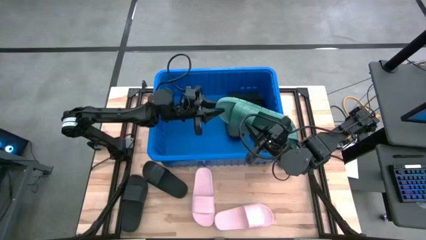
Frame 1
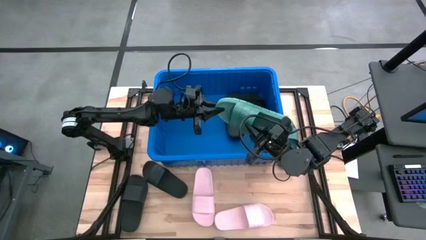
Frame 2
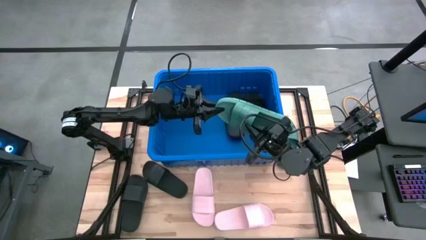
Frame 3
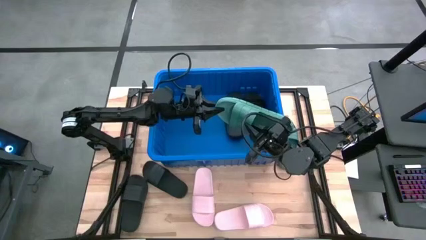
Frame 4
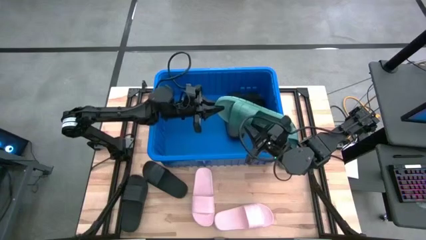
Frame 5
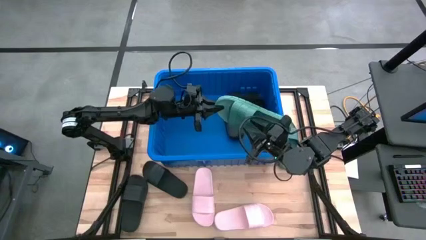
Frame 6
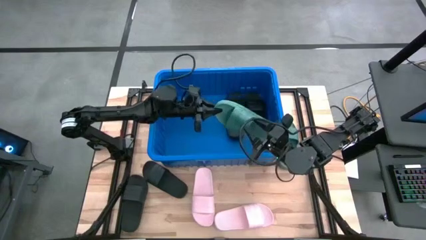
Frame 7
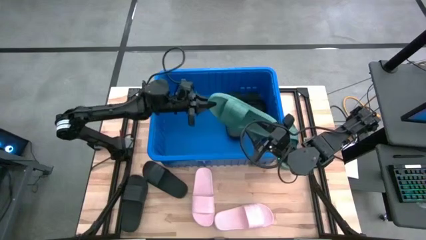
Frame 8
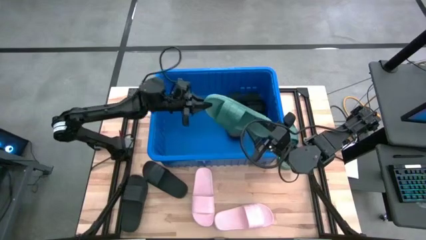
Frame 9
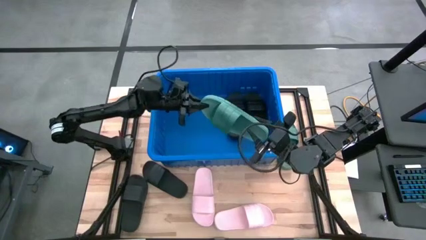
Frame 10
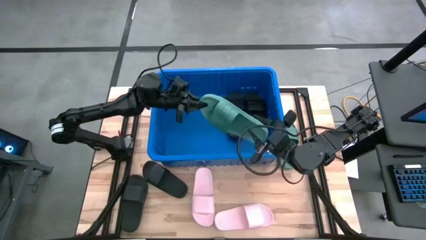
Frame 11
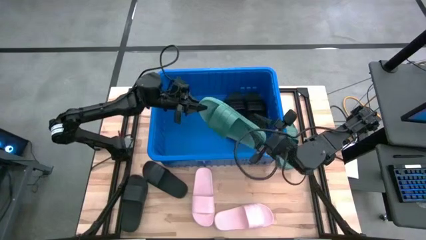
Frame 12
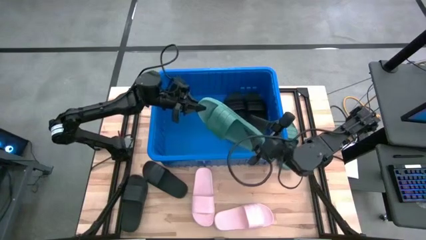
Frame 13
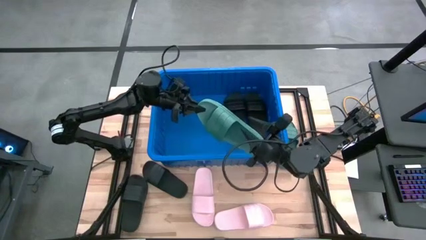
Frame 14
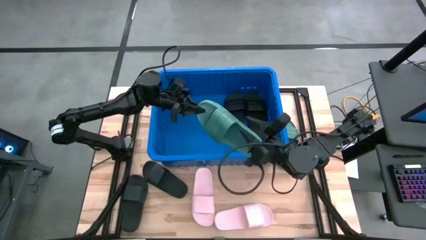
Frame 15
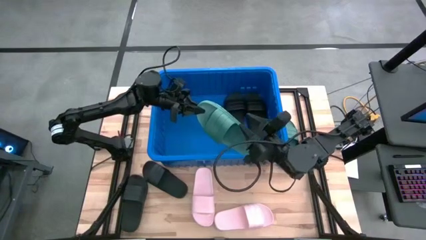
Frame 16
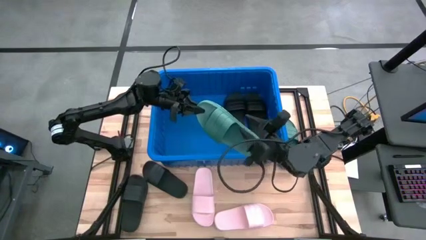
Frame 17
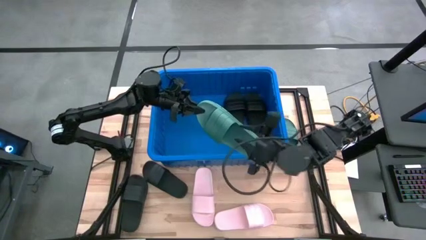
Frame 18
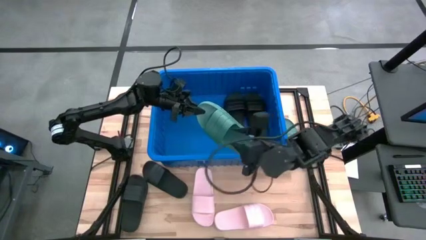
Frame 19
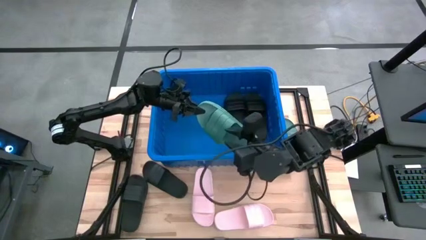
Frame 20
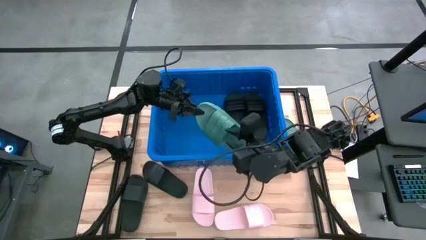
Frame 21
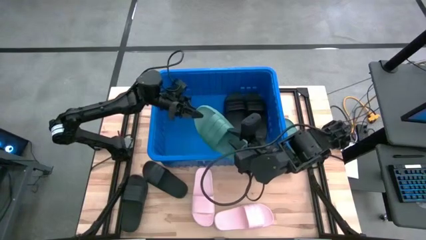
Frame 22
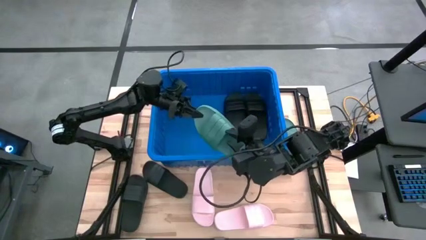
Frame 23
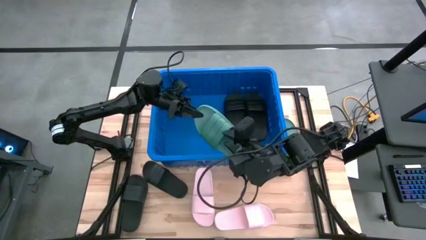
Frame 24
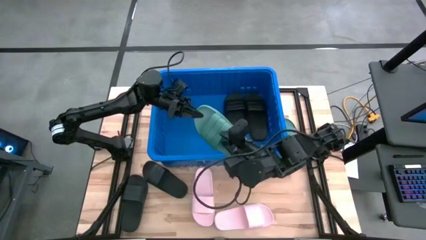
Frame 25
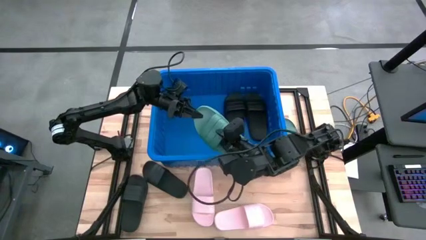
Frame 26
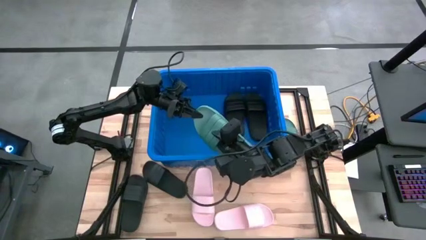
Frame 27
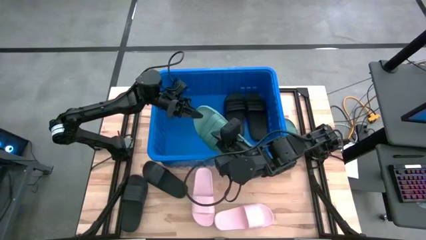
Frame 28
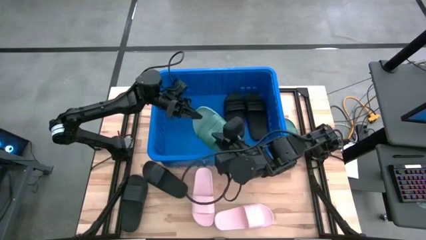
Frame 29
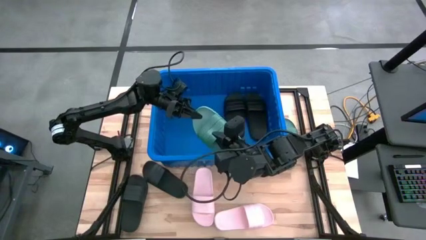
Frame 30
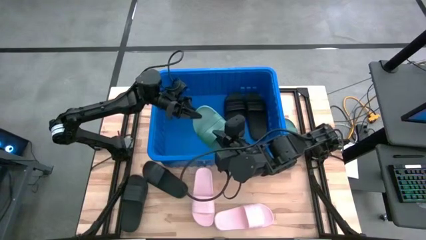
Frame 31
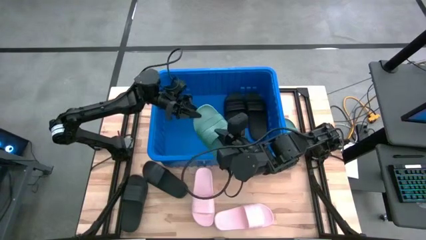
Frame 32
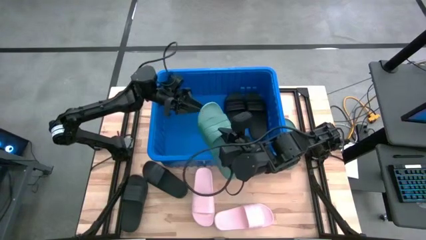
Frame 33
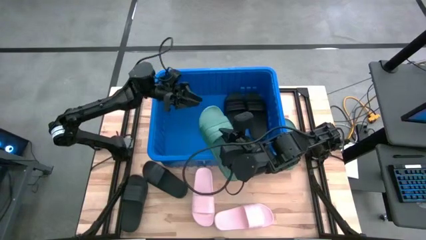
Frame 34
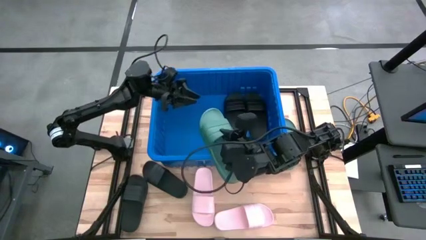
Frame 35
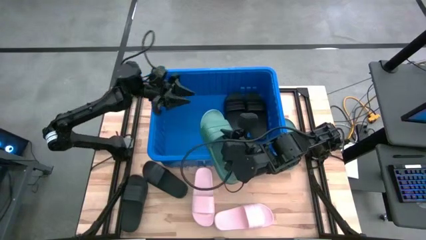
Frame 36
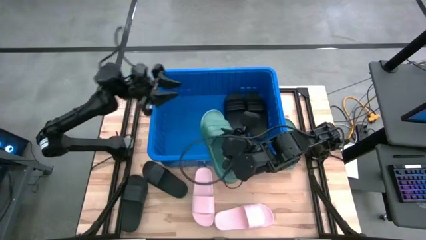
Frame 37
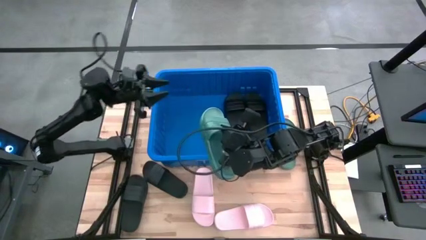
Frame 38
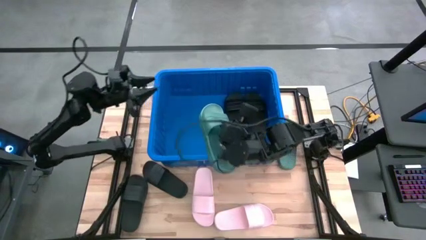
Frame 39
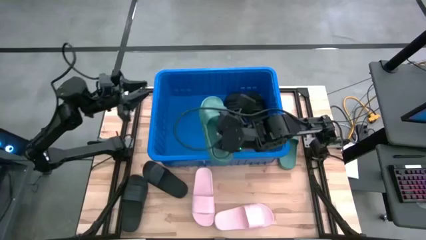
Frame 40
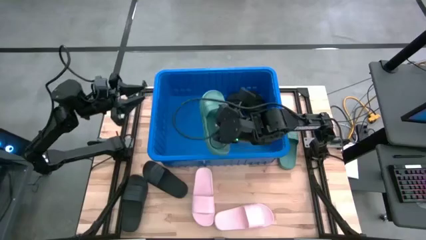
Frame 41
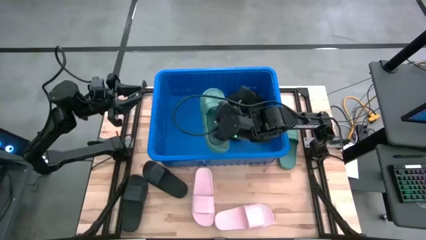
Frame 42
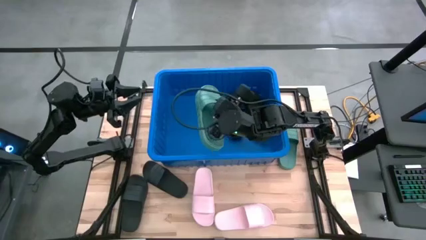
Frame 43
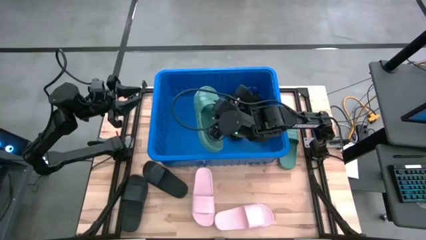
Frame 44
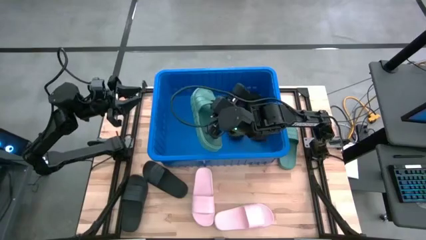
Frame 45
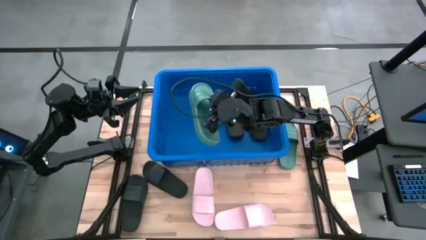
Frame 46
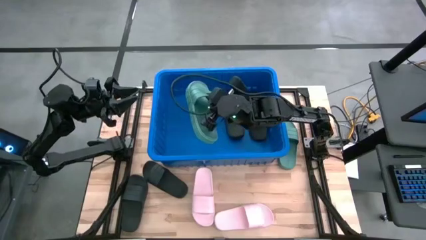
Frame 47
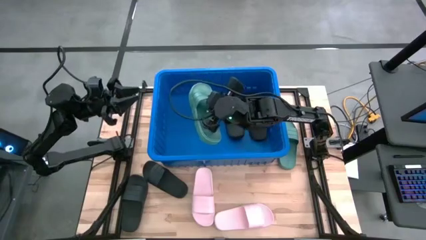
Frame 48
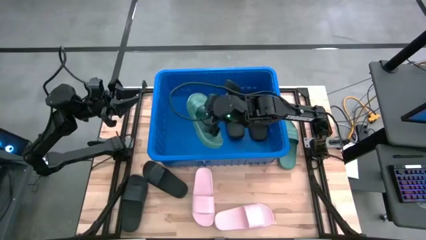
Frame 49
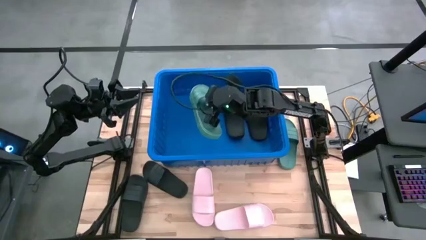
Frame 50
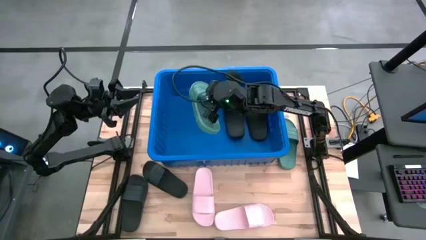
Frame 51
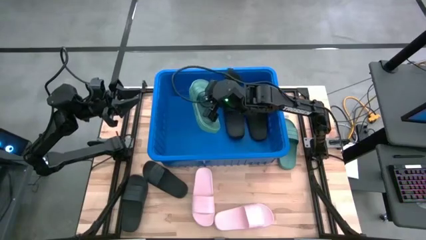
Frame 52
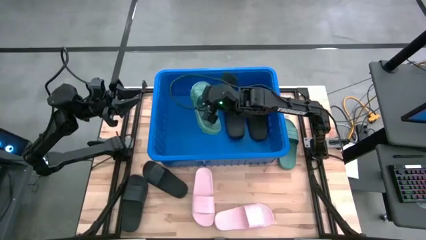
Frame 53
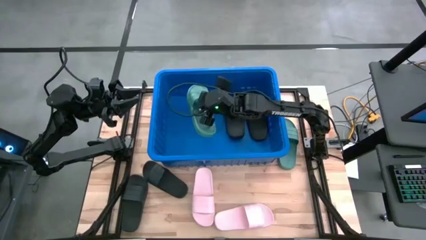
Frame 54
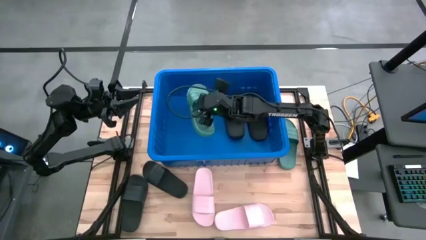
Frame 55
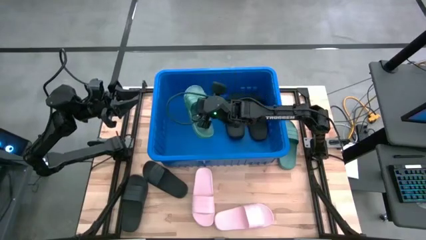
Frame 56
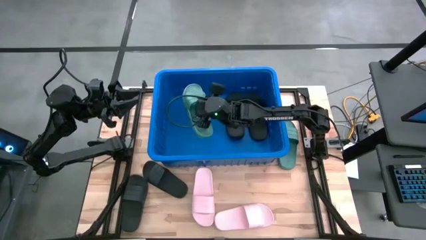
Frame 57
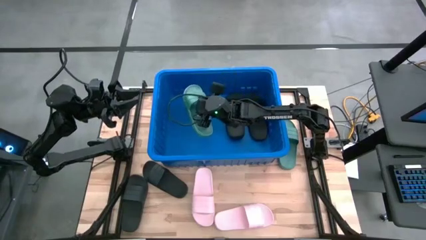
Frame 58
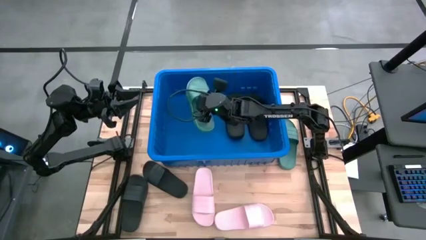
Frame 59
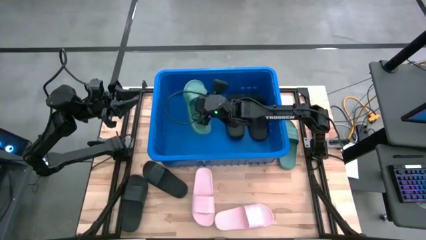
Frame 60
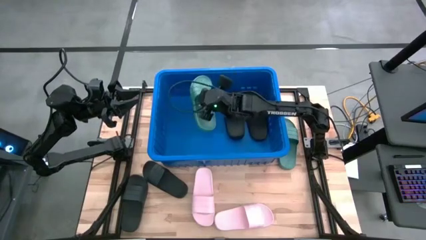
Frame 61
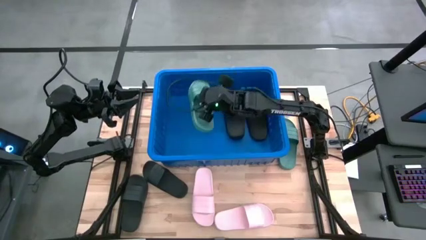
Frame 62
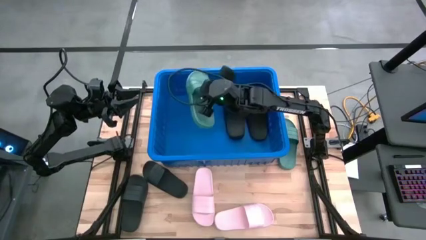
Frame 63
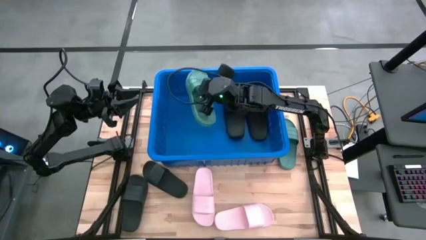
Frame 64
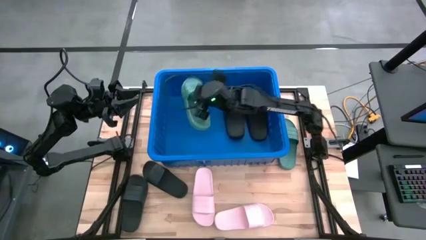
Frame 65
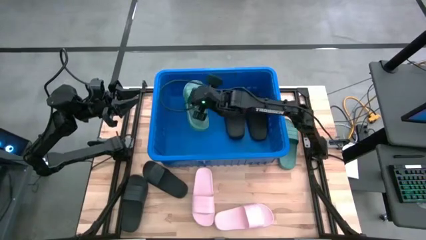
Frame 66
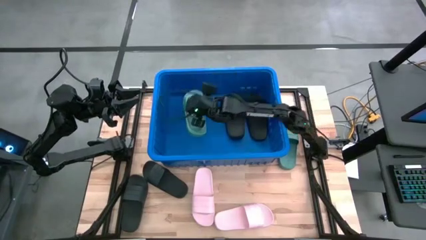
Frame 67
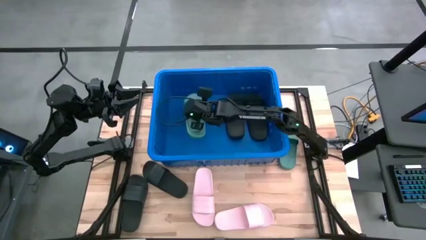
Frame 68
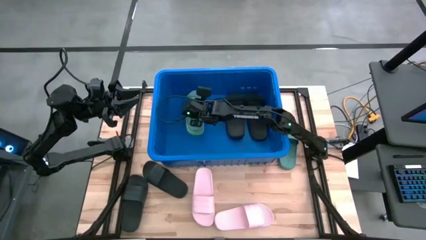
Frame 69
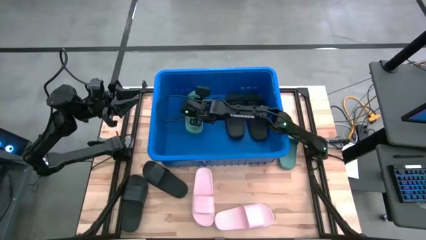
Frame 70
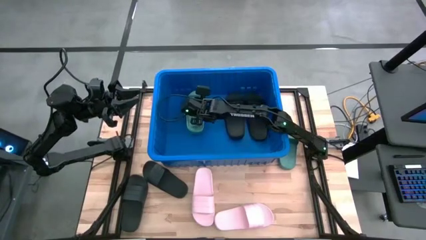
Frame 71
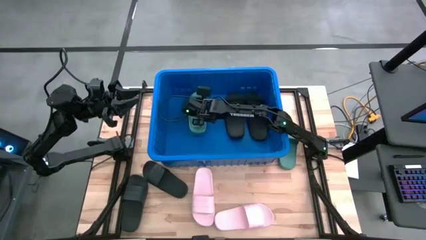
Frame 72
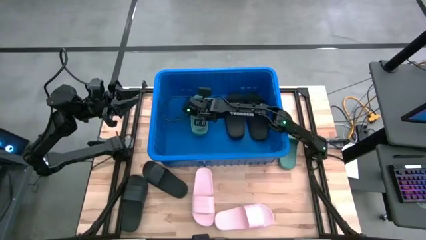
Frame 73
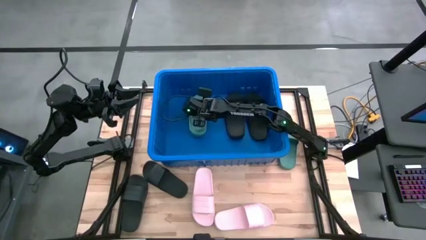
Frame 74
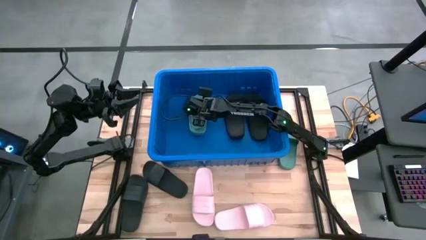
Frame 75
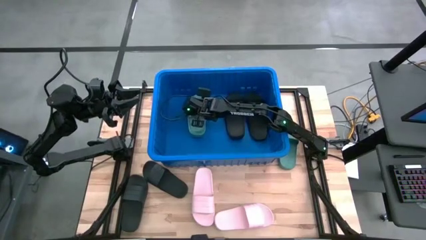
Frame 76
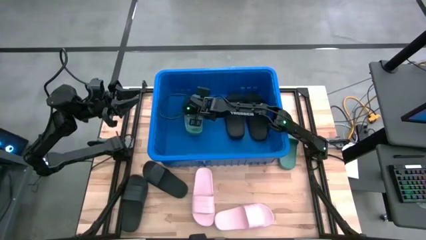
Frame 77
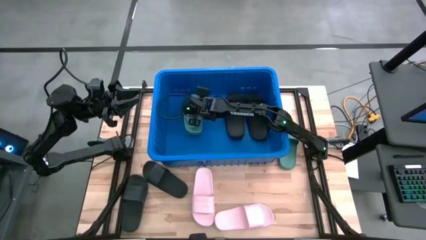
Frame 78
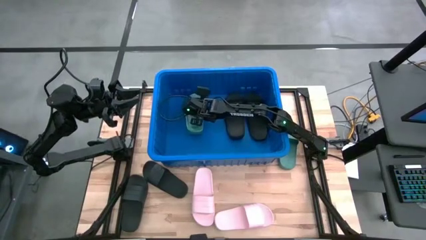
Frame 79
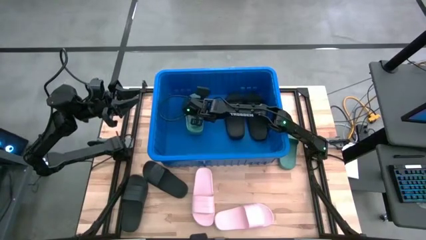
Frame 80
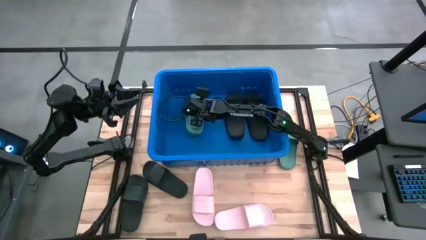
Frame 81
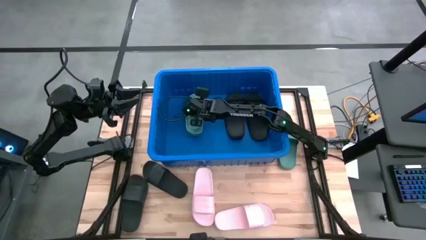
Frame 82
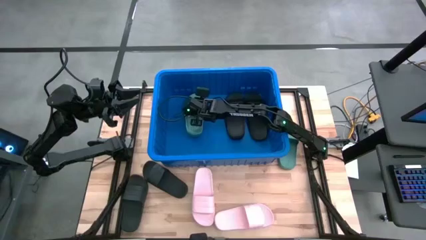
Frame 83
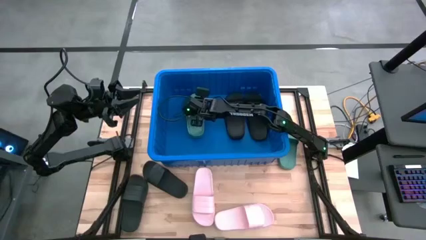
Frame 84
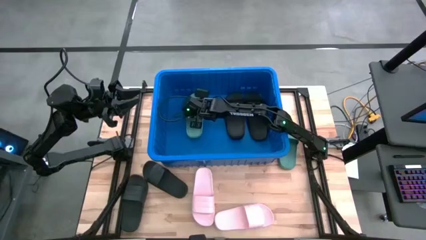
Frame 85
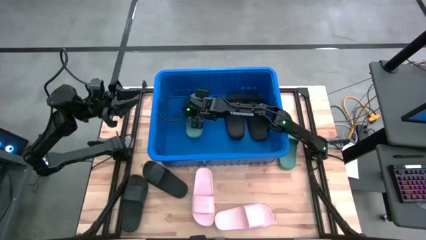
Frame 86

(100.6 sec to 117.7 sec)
Task: Pick and place slides into bin
Put the bottom green slide into the blue bin
